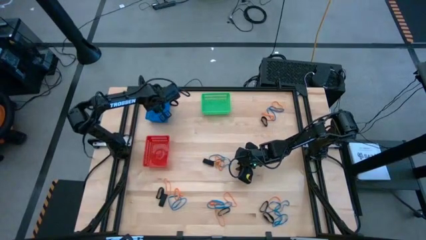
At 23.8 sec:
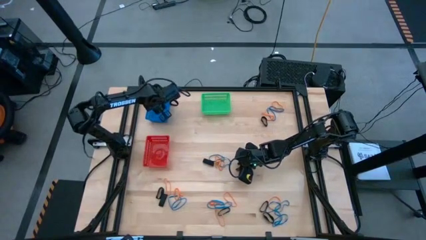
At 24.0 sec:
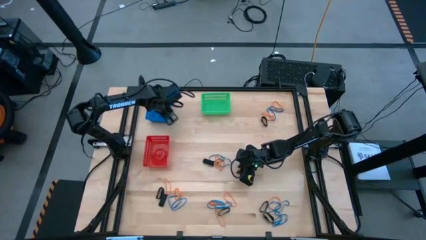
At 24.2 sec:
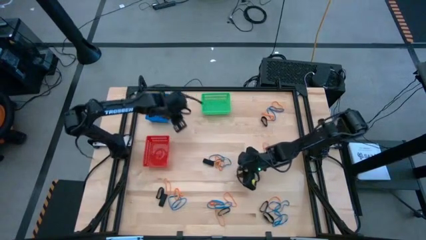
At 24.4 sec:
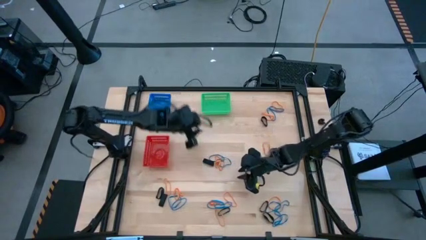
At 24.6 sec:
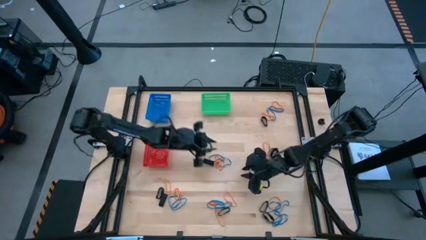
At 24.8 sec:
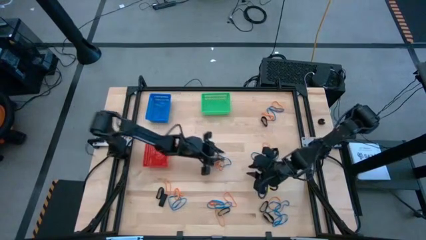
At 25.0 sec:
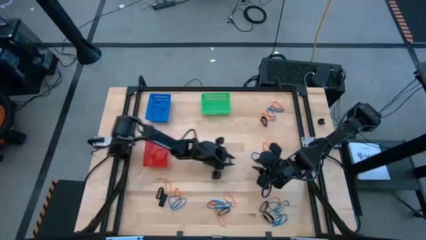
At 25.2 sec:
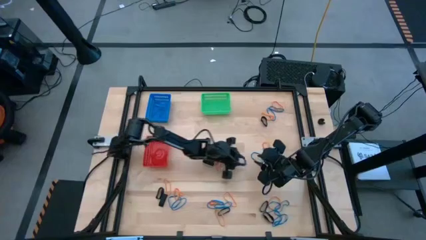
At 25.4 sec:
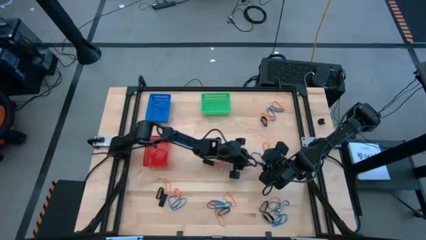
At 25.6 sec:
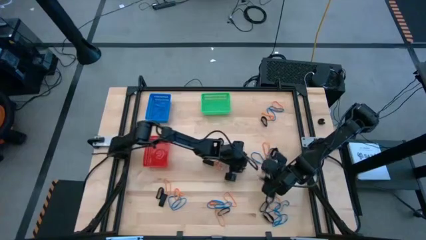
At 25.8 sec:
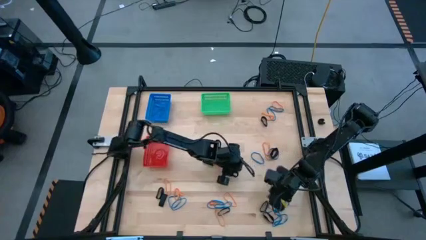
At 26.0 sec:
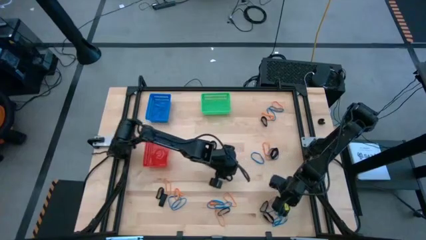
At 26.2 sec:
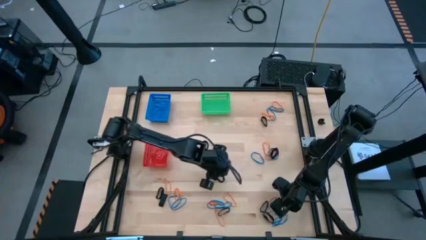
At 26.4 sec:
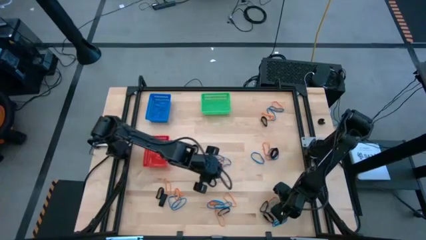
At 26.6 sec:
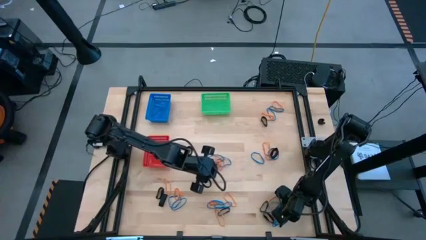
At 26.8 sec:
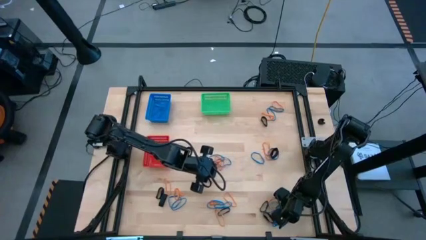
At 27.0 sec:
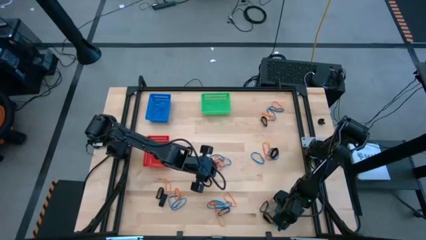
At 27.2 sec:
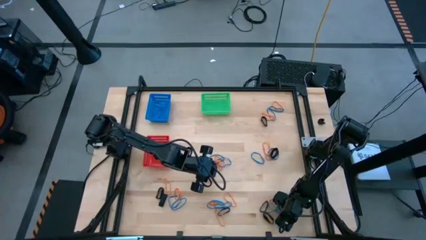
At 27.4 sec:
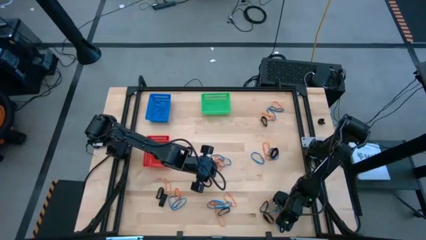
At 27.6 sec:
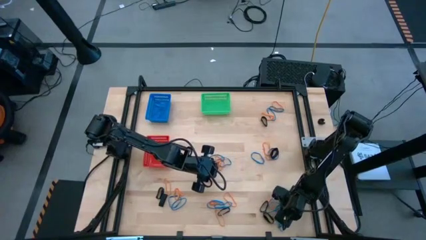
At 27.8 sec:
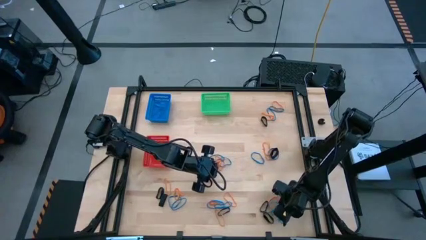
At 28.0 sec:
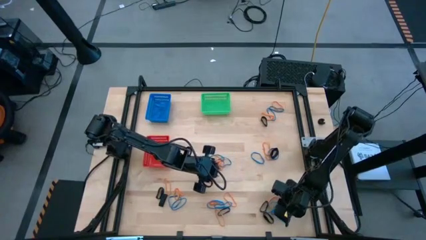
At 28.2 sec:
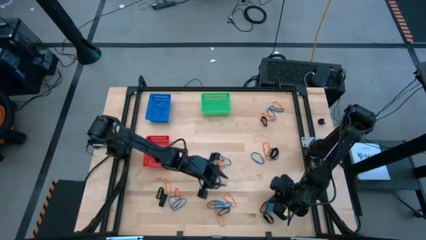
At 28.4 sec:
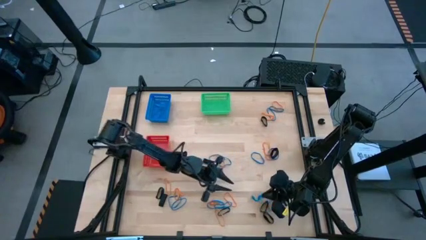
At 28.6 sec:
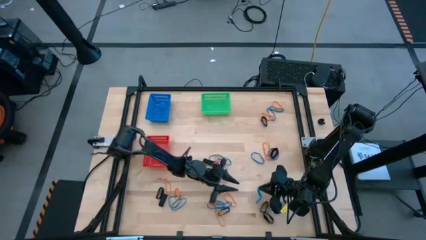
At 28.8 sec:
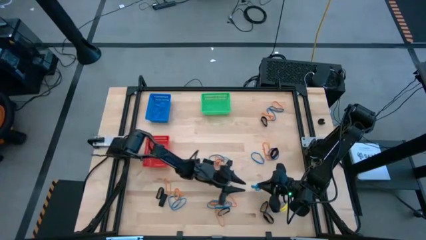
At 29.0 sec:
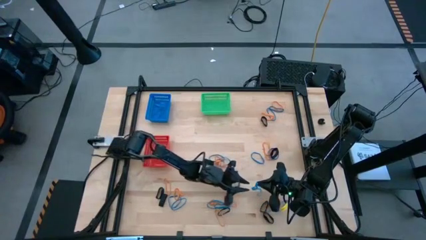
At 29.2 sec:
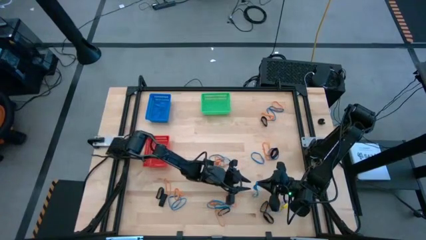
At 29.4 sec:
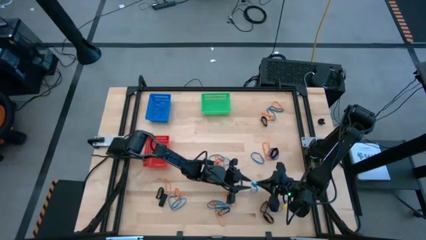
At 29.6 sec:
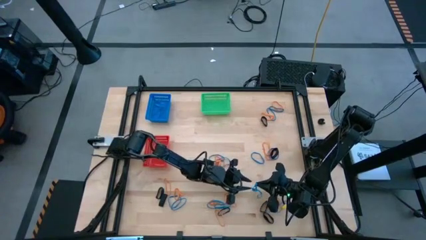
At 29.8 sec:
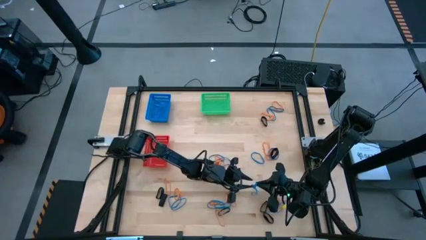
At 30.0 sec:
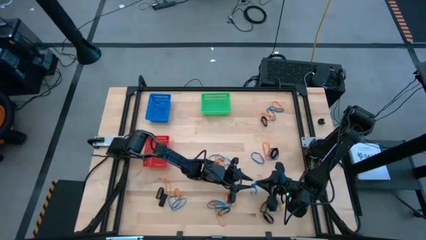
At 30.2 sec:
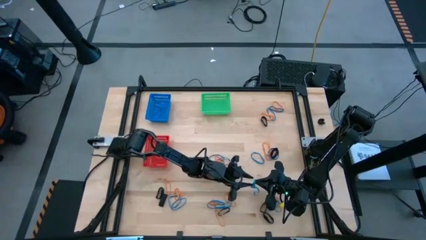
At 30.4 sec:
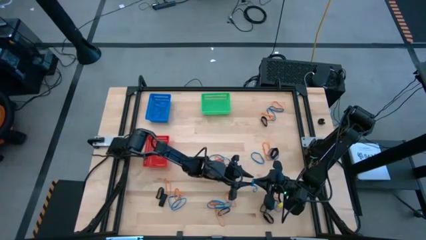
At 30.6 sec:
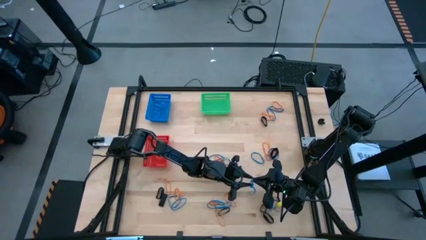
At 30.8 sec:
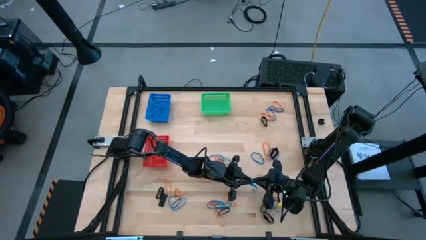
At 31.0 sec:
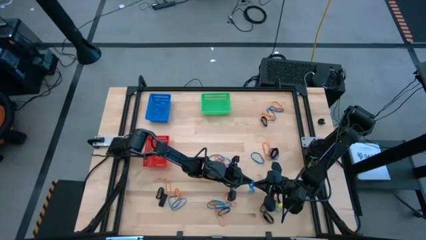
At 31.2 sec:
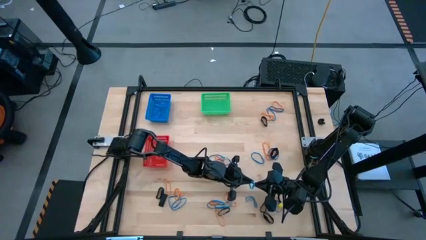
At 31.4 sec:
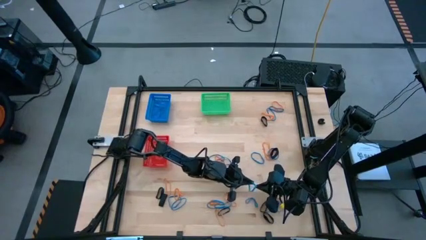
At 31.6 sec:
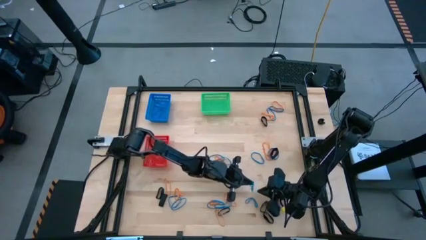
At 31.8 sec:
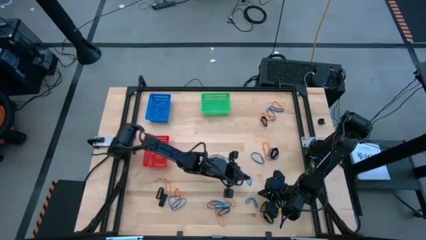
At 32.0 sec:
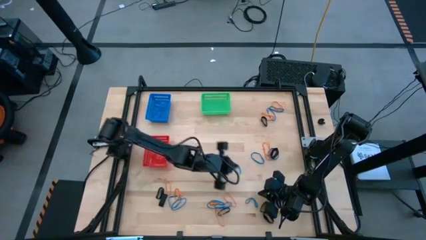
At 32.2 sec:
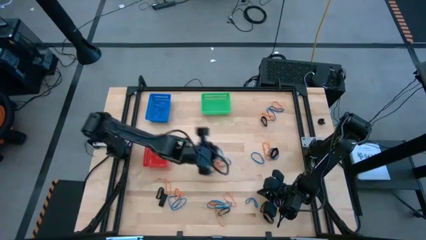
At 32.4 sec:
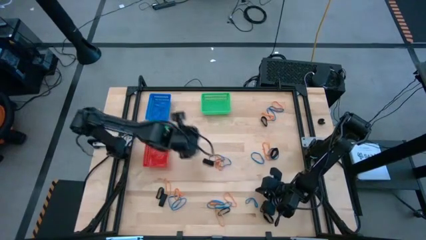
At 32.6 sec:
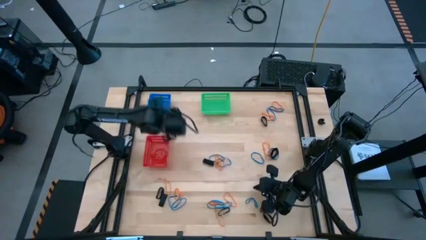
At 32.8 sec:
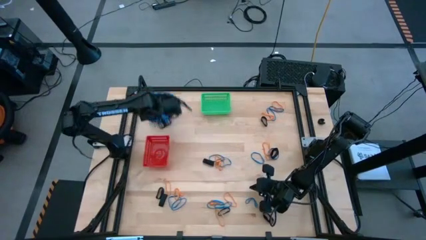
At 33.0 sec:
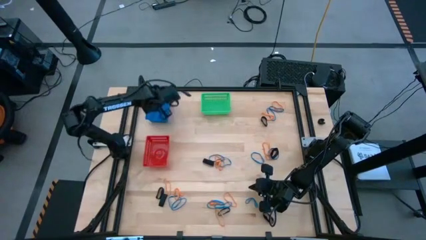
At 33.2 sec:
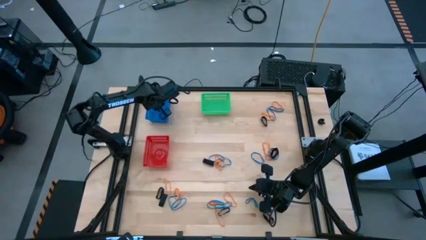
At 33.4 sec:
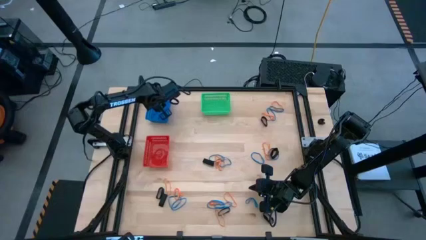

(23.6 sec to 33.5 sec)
Task: Sort rubber bands into baskets
Put the blue rubber band into the blue bin

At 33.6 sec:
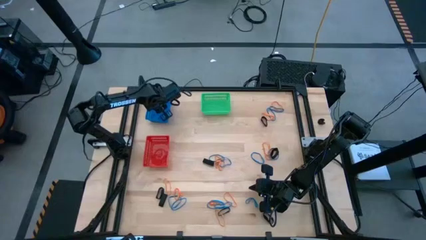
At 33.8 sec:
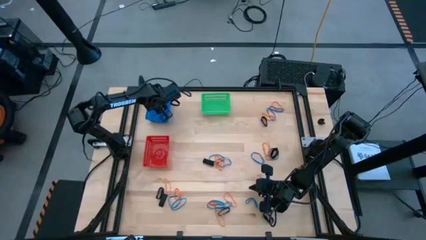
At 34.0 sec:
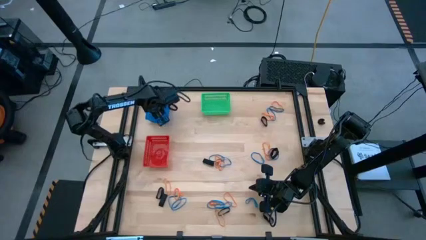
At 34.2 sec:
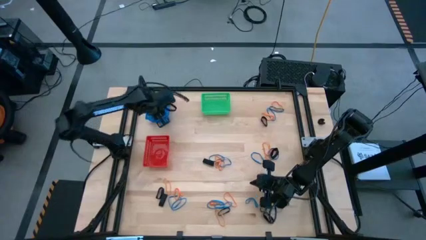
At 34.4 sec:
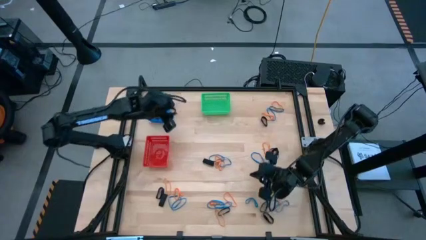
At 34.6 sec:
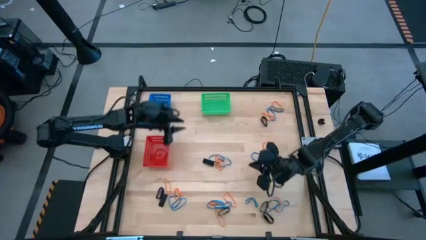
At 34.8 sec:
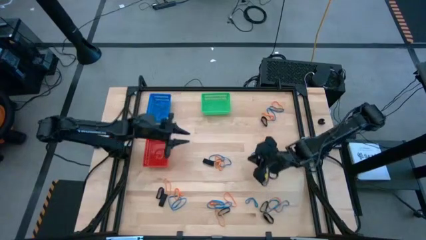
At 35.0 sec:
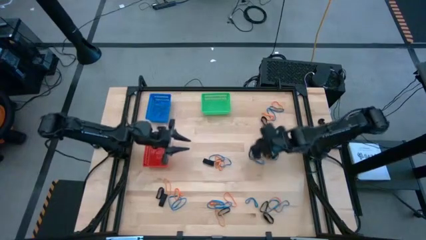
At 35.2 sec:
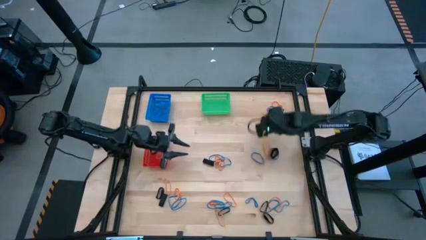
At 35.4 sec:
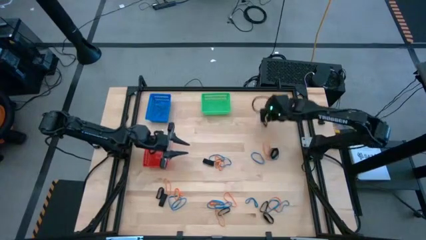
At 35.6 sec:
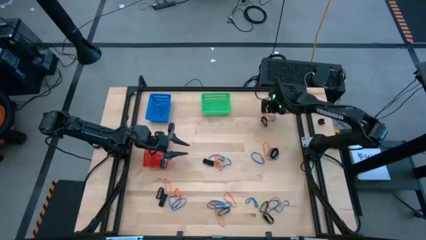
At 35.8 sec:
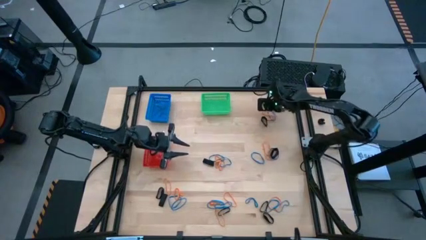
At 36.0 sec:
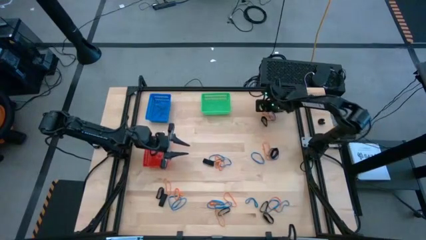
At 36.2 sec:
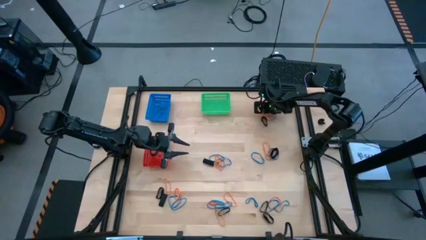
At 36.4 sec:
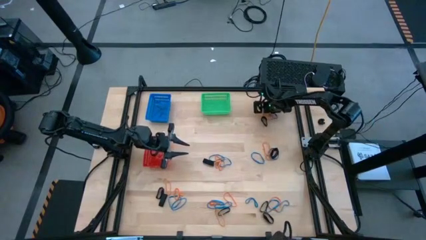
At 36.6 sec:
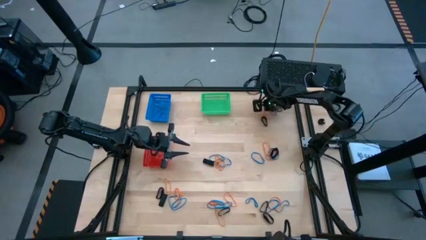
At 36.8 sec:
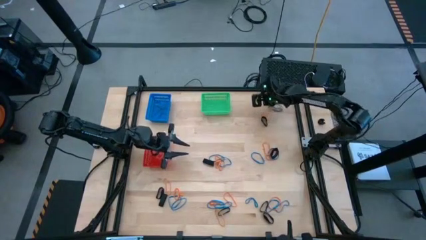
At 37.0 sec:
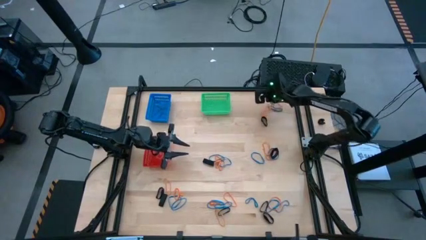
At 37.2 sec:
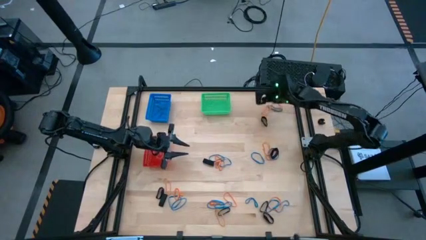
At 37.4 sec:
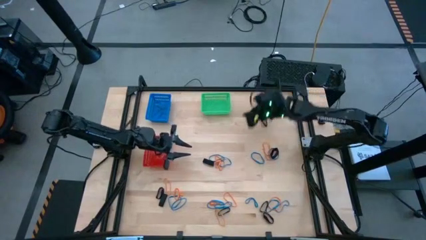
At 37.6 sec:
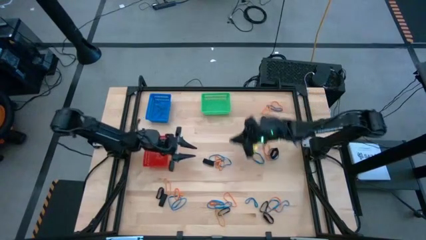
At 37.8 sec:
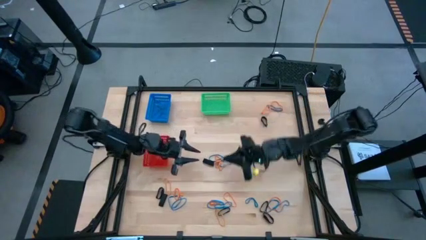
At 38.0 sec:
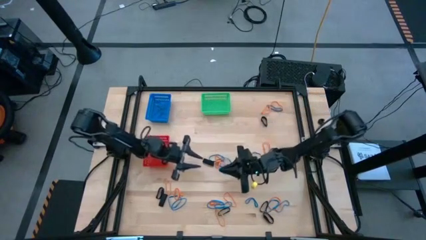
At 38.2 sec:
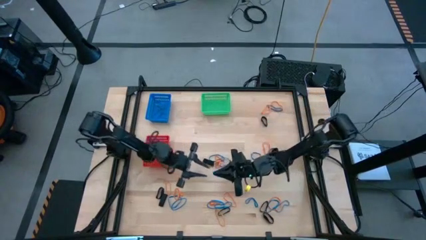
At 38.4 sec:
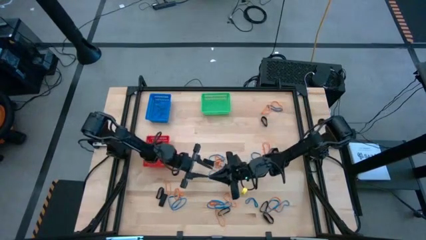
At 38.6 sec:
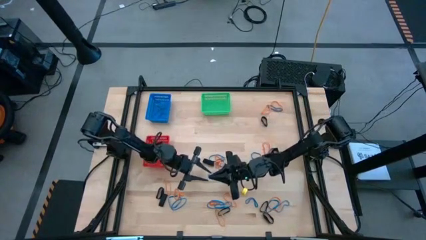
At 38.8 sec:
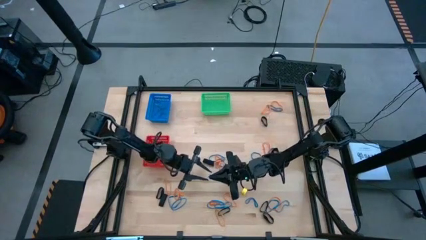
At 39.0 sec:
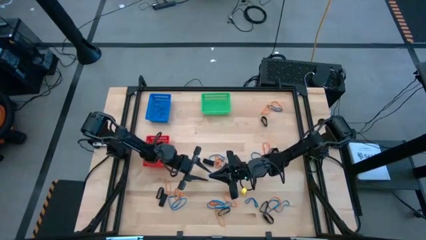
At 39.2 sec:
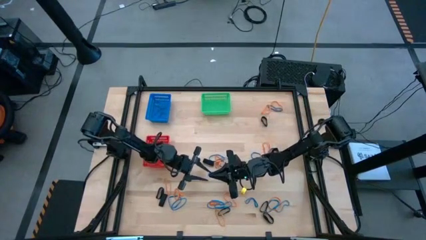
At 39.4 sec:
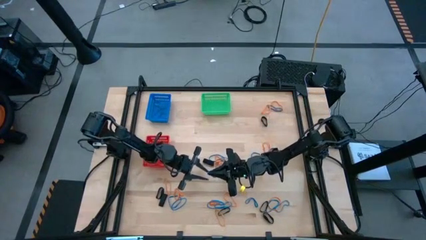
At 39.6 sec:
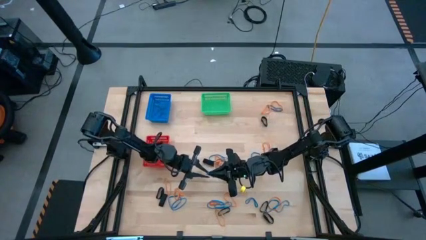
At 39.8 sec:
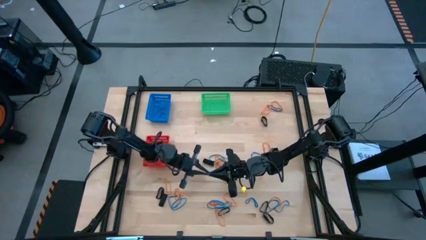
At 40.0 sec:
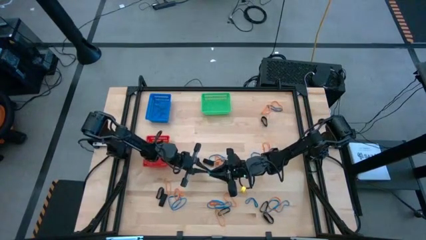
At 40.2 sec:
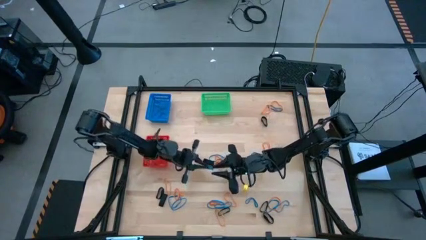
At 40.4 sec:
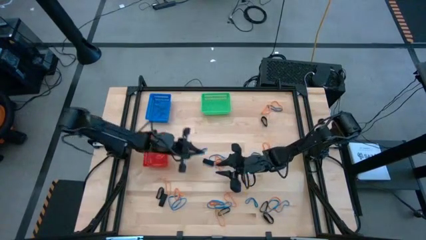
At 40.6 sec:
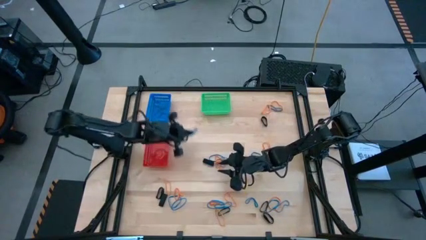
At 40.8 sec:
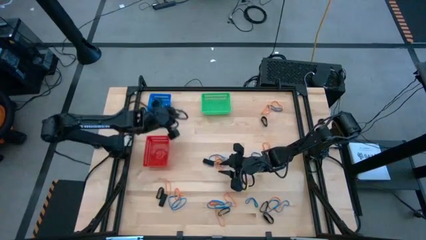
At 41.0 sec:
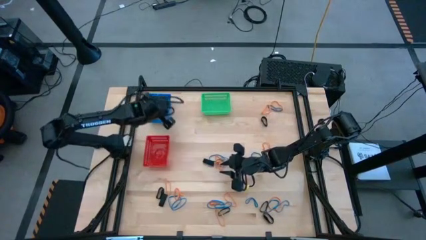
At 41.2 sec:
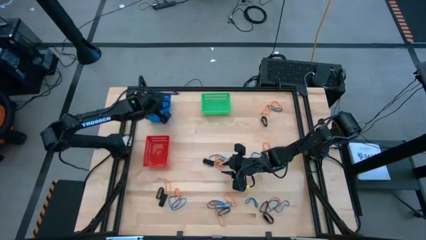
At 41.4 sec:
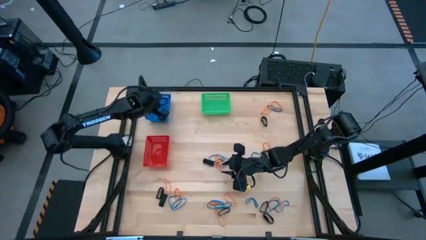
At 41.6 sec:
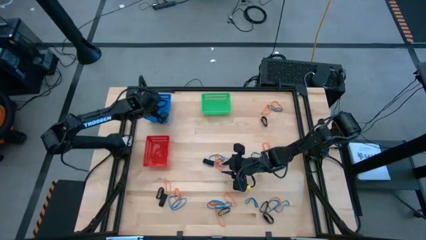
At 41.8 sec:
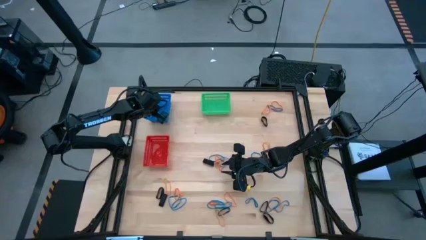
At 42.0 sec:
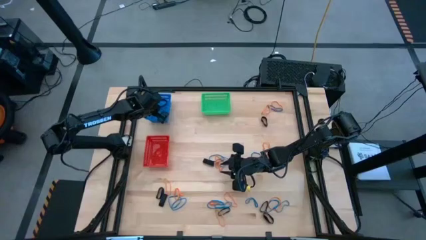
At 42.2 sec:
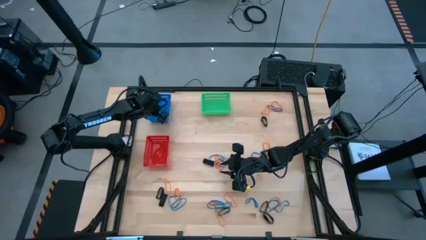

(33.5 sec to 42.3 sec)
Put the blue rubber band into the blue bin
